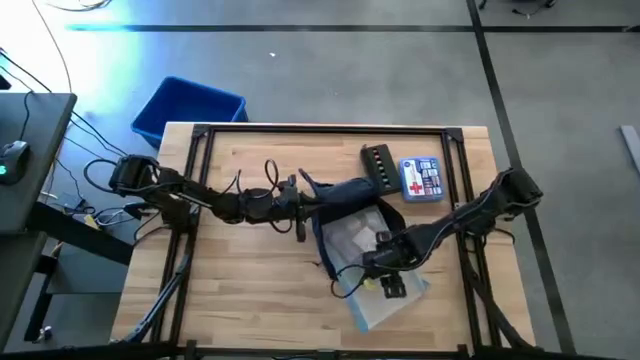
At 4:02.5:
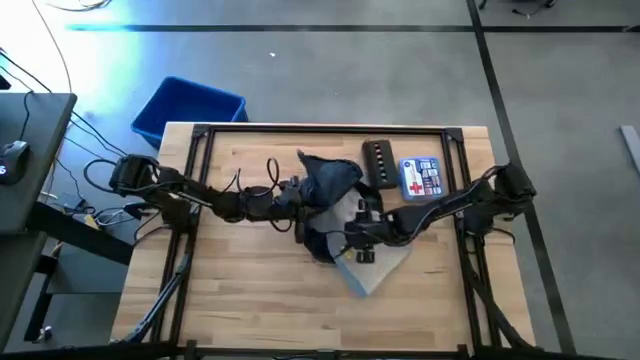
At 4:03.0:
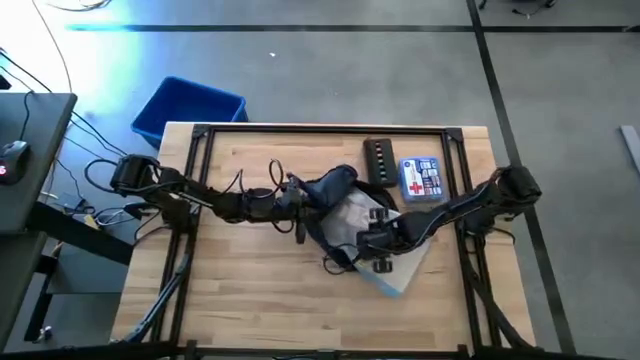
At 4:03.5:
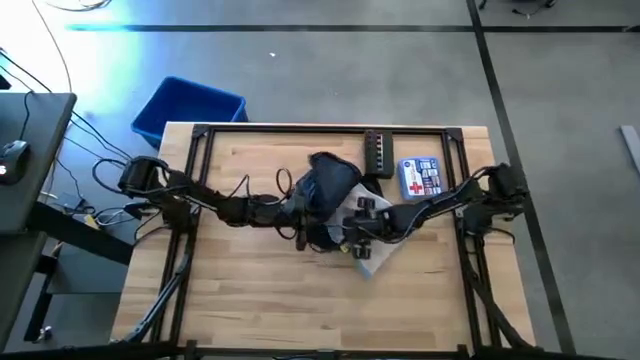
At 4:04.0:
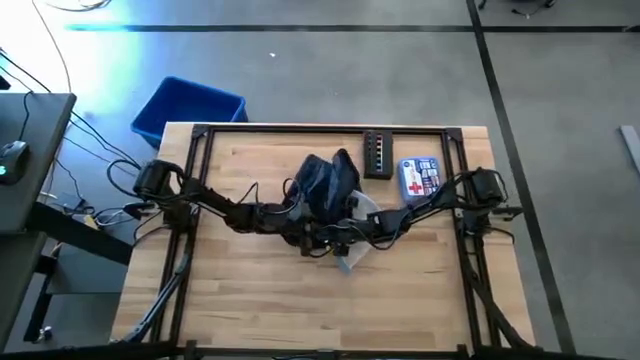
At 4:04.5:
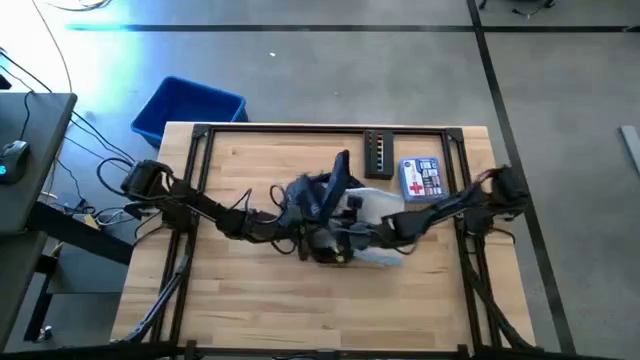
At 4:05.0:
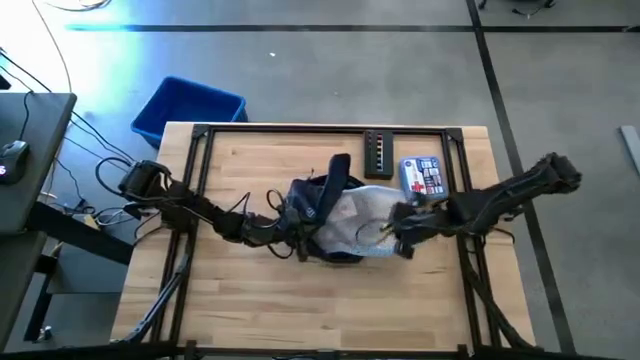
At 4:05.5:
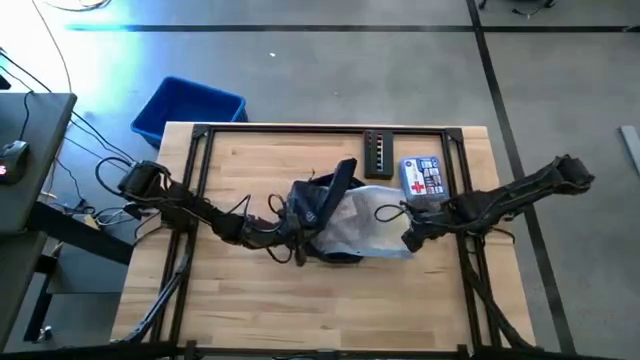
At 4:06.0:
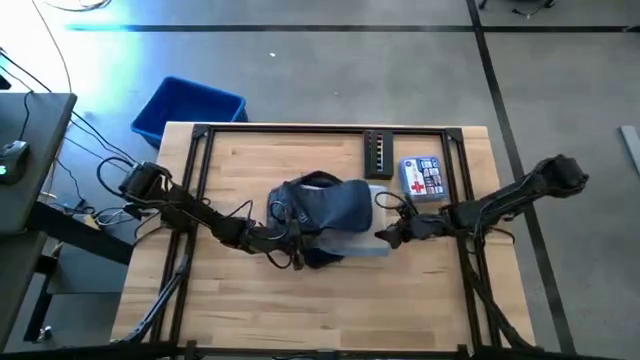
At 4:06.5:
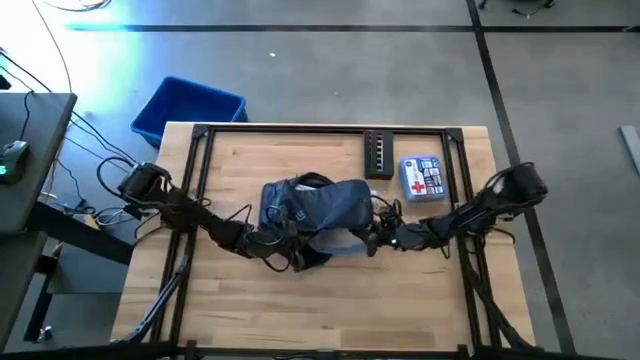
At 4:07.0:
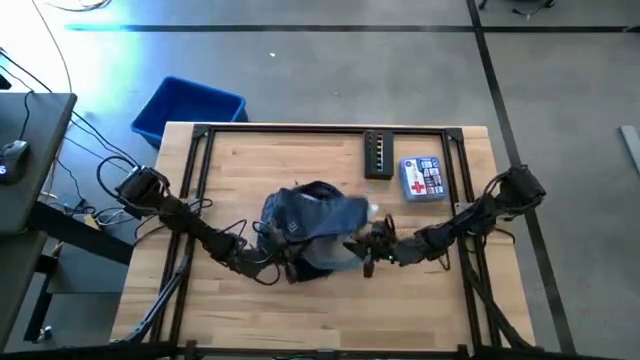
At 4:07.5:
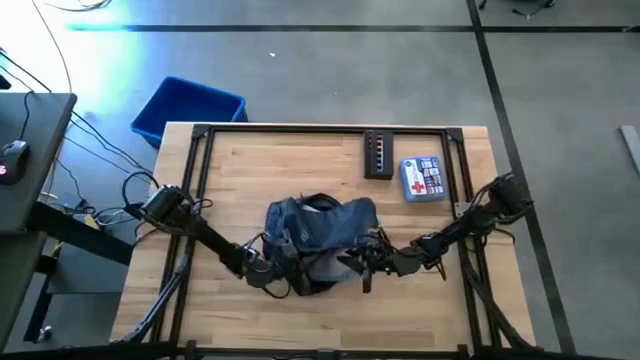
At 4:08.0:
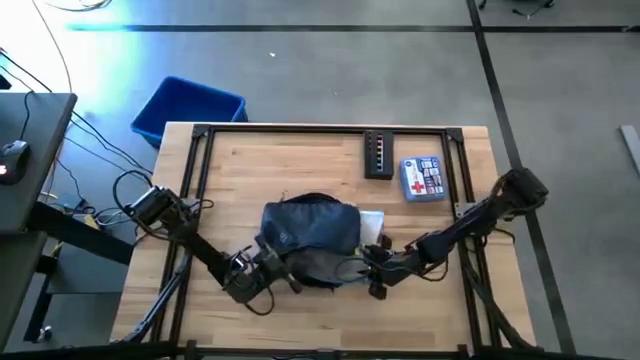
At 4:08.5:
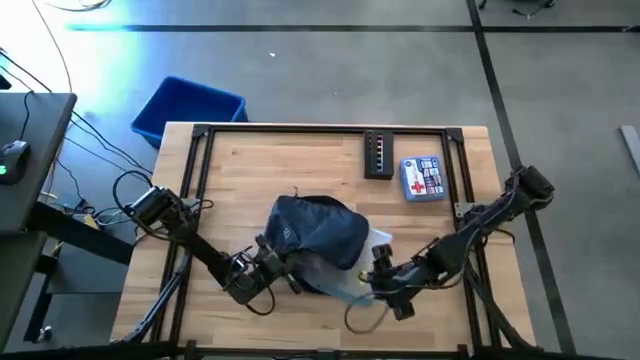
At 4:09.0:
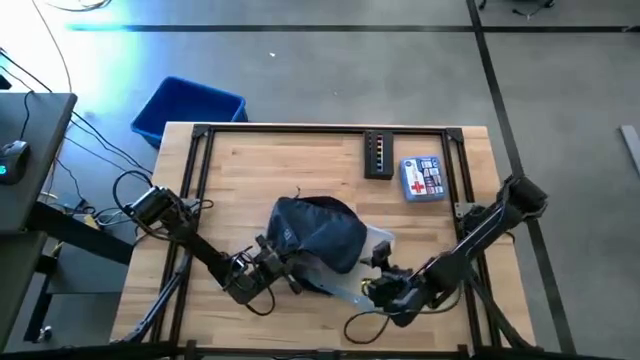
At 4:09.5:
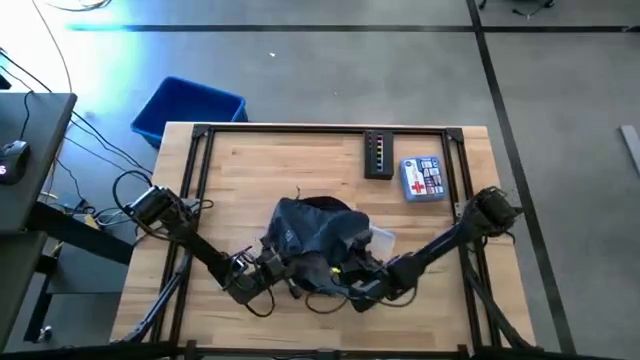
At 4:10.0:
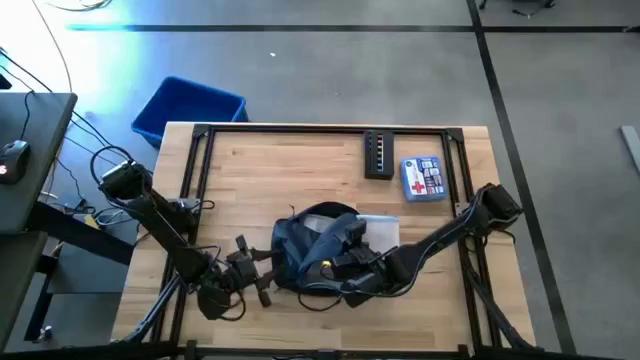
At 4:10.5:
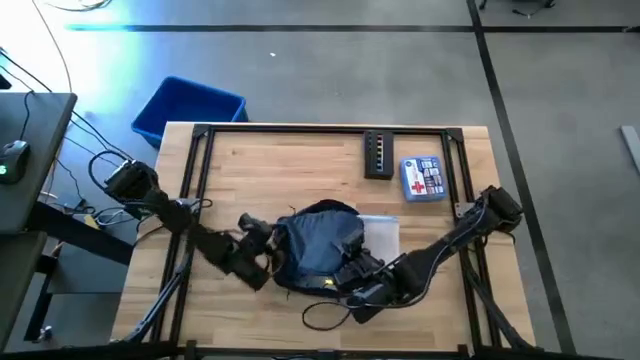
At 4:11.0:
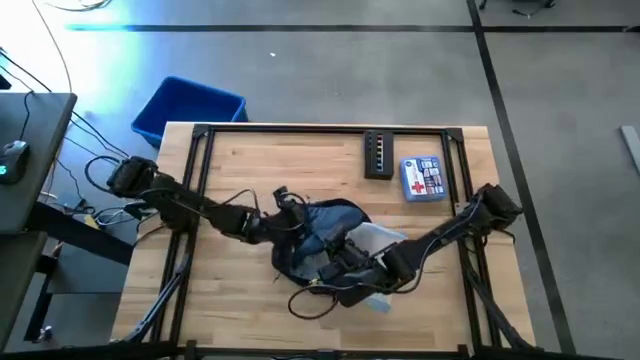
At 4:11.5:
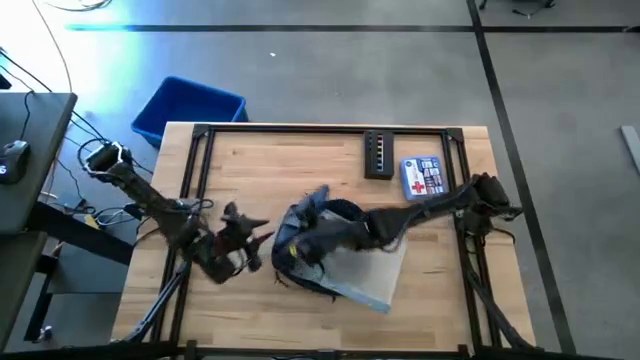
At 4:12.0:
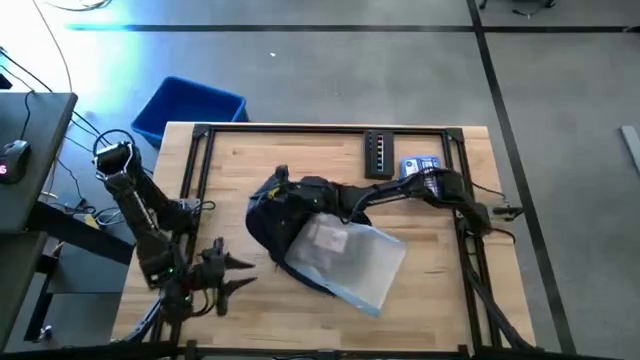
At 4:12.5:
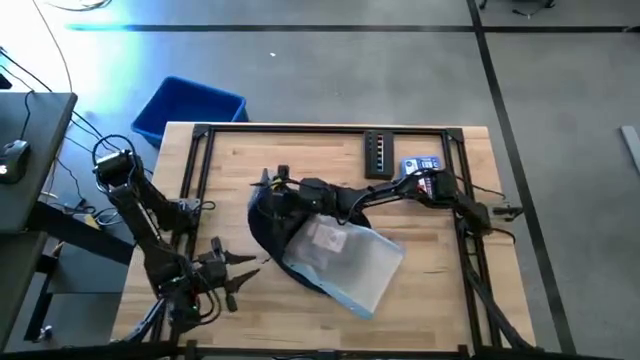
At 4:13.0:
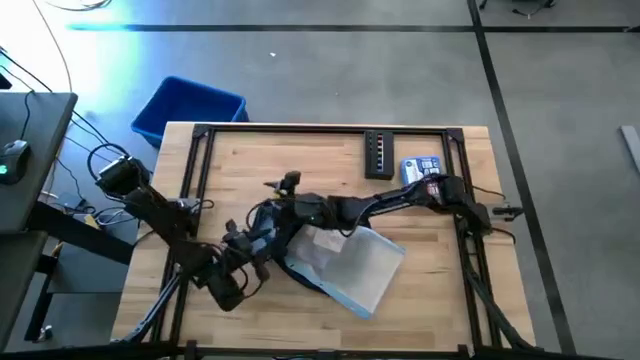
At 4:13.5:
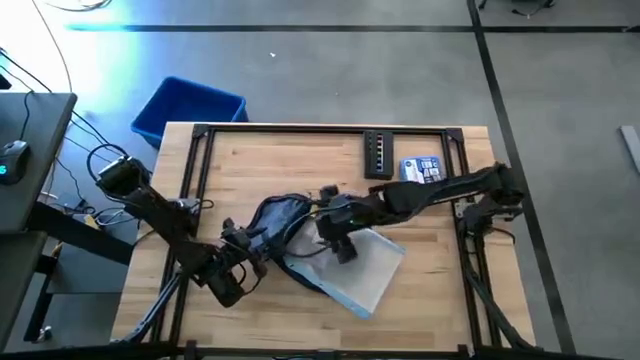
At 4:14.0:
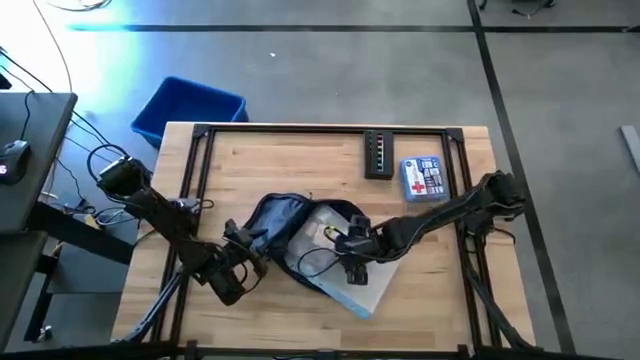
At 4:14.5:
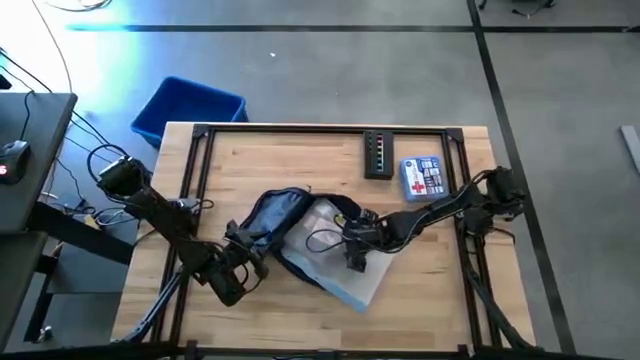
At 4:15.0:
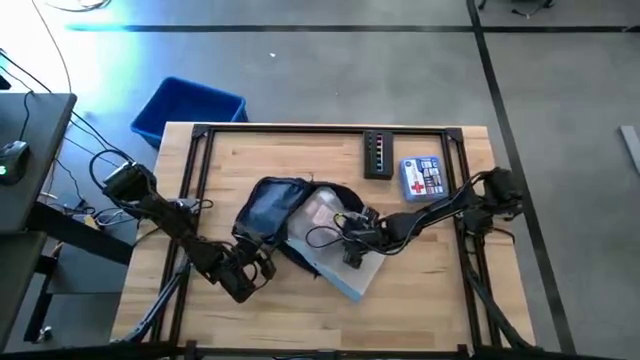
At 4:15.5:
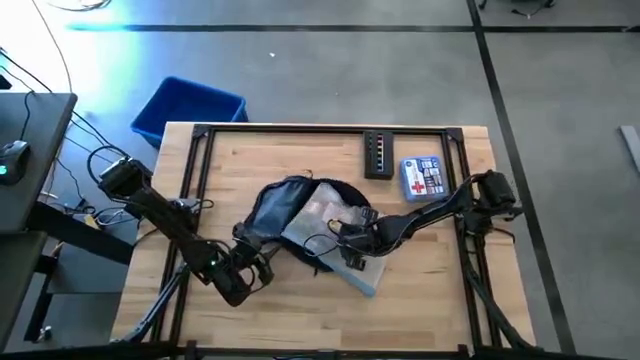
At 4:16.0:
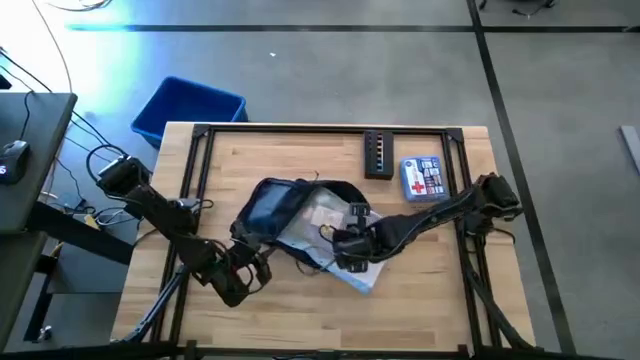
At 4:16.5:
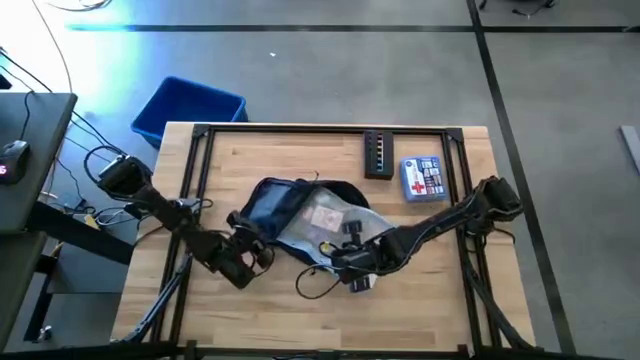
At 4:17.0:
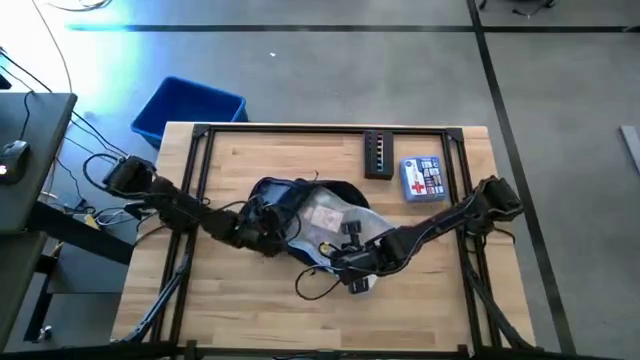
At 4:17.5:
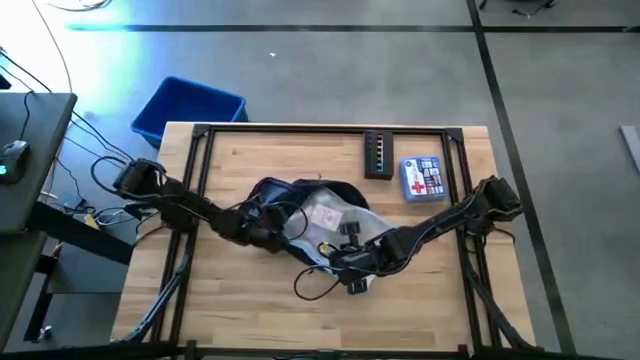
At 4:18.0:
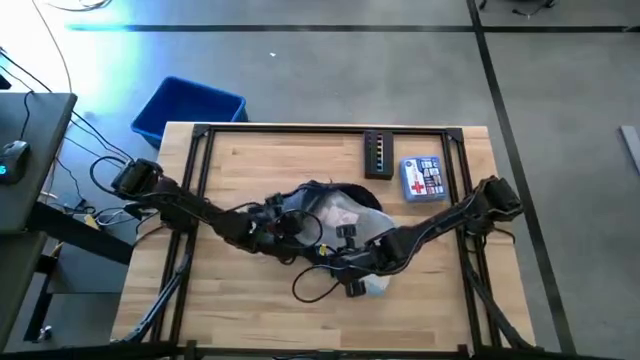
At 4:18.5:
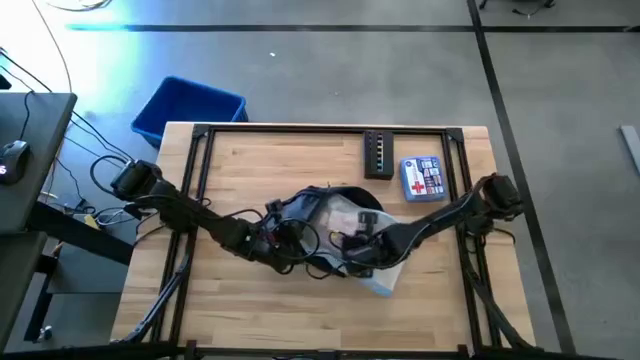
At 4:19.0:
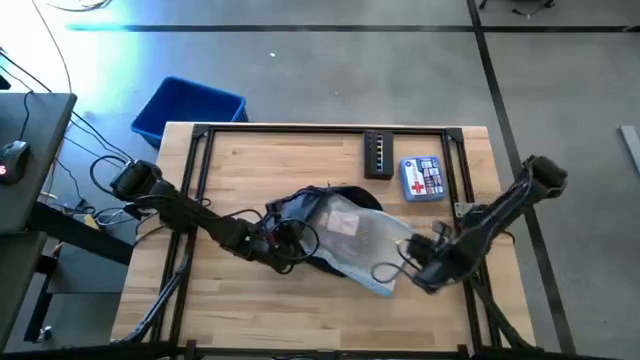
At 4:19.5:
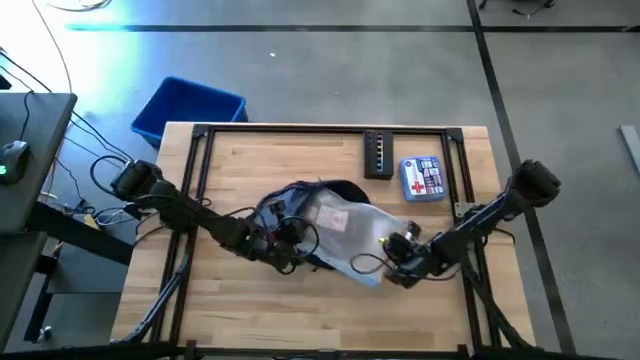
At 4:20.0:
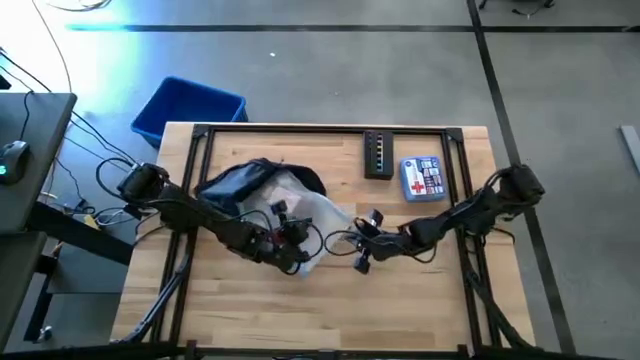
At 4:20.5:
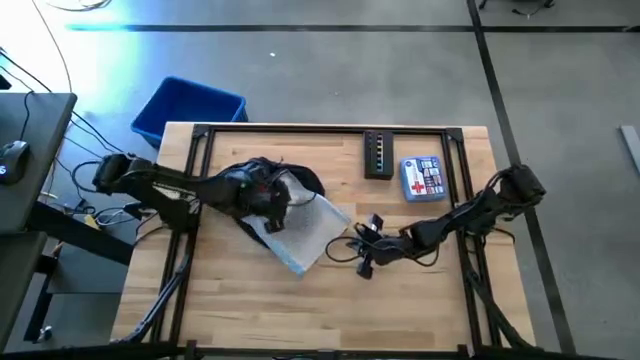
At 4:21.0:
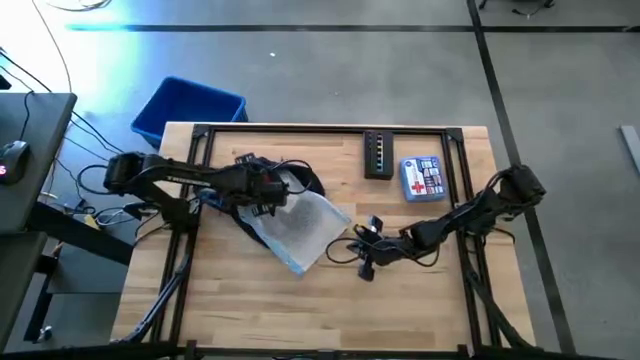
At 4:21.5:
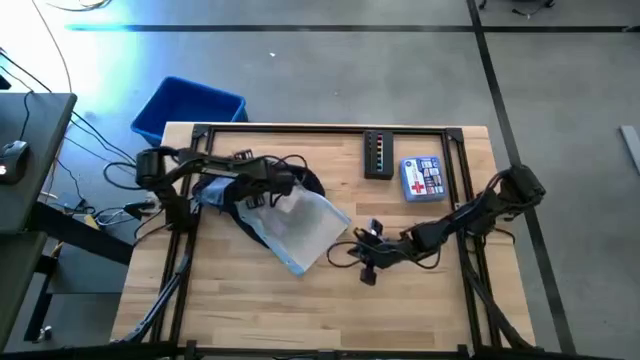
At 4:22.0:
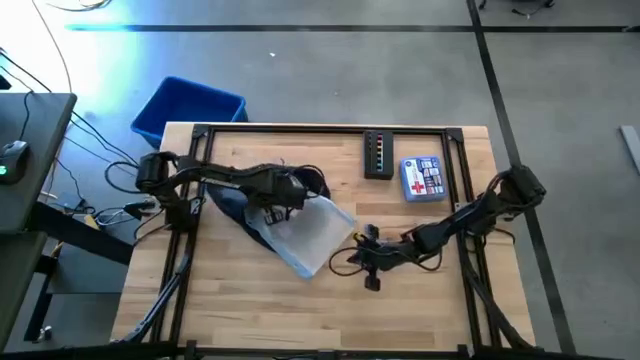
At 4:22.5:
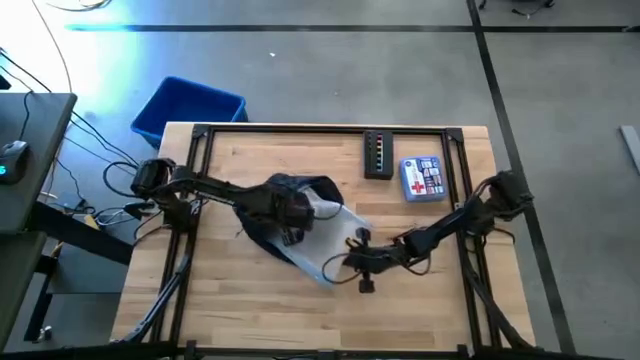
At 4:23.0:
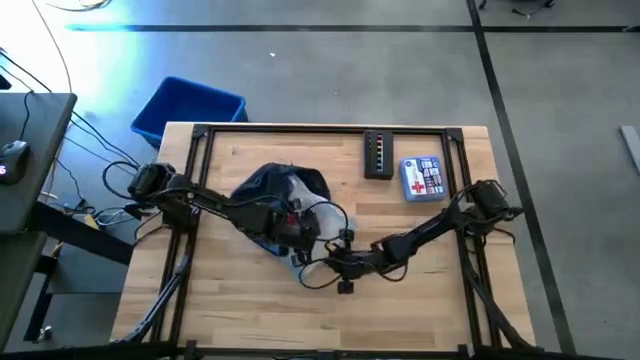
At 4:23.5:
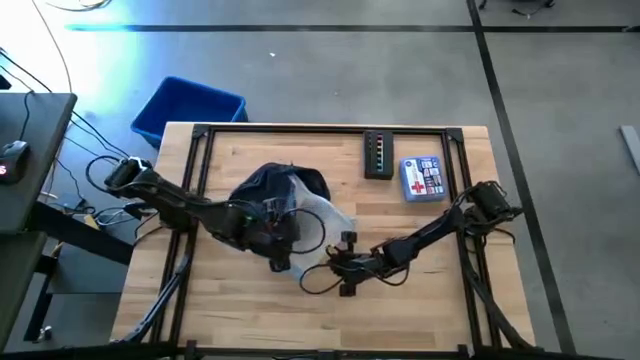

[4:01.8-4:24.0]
Task: Unpack backpack
Put the white zip bag into the backpack
